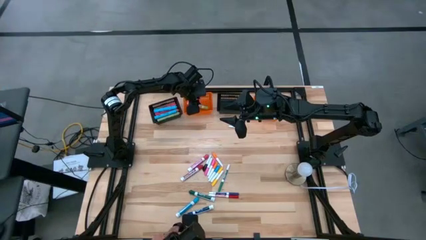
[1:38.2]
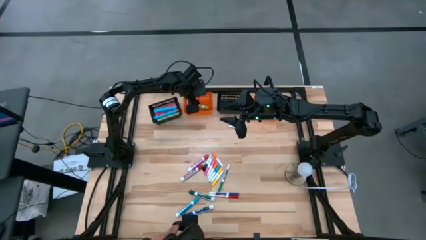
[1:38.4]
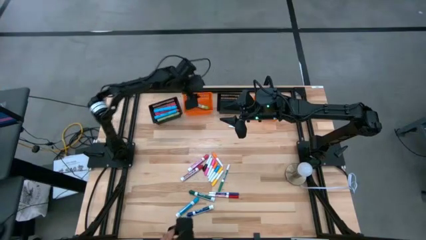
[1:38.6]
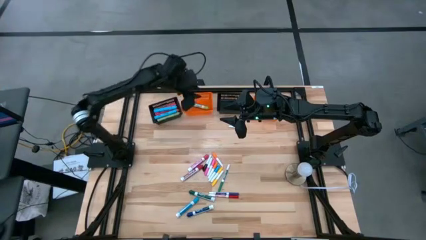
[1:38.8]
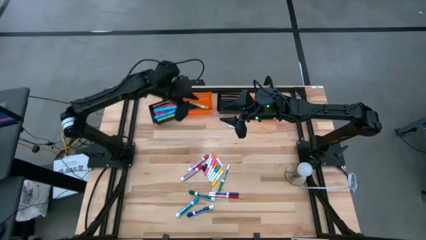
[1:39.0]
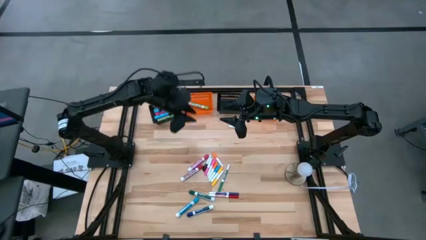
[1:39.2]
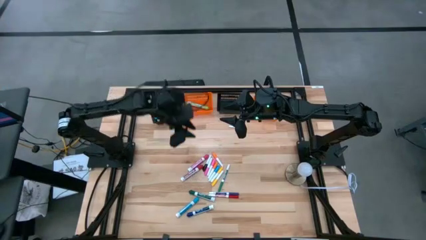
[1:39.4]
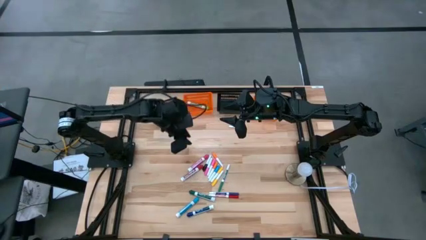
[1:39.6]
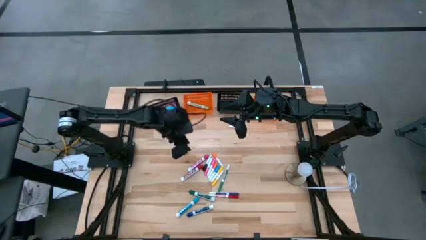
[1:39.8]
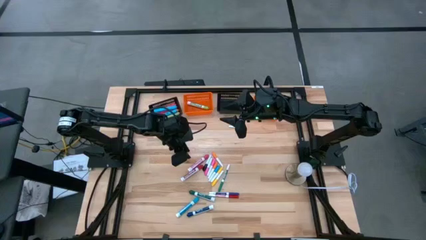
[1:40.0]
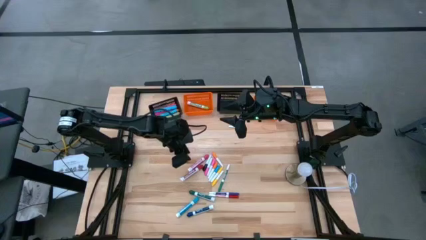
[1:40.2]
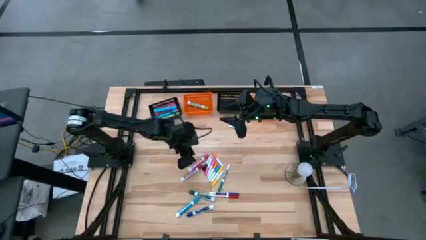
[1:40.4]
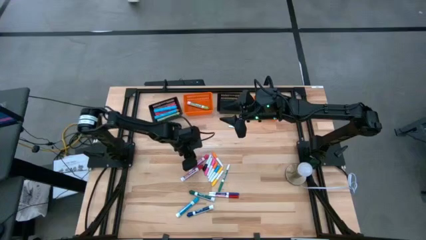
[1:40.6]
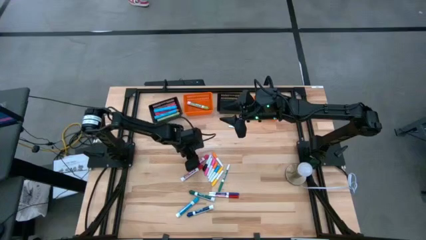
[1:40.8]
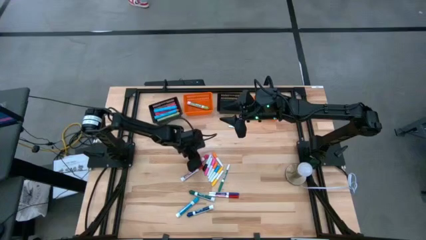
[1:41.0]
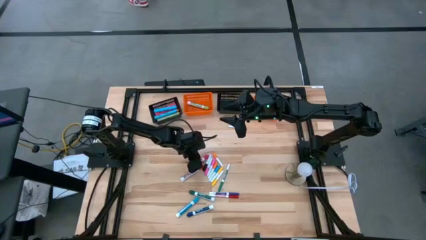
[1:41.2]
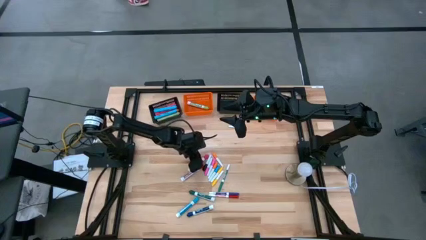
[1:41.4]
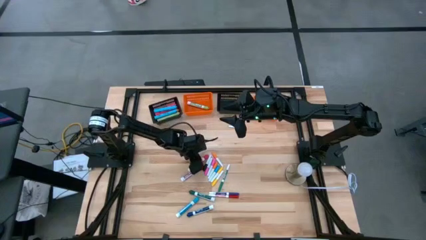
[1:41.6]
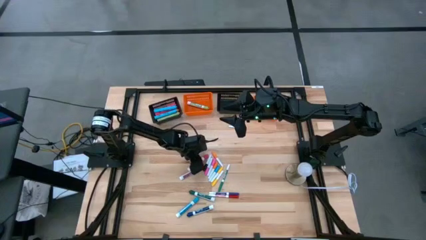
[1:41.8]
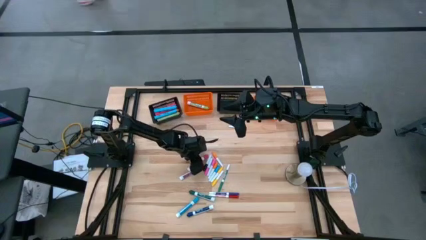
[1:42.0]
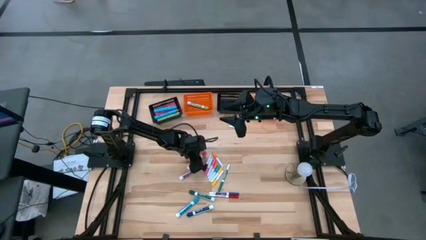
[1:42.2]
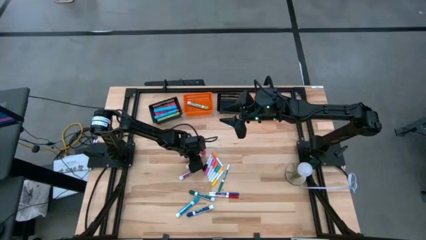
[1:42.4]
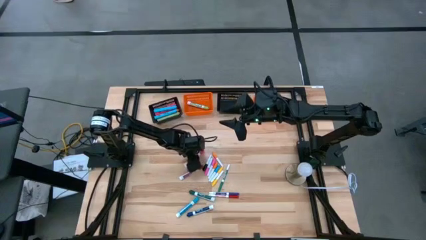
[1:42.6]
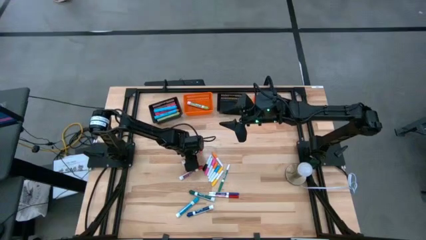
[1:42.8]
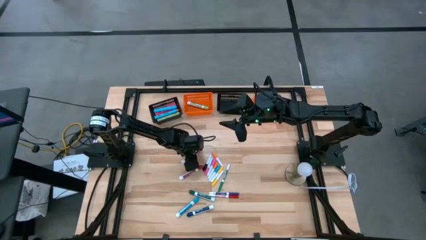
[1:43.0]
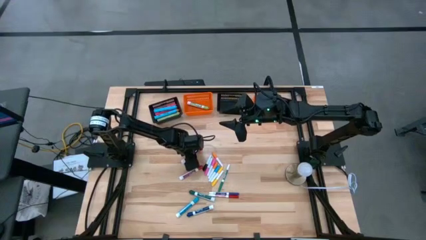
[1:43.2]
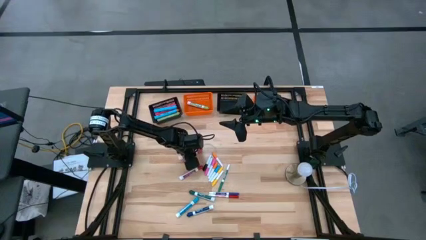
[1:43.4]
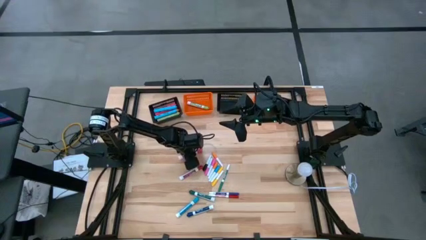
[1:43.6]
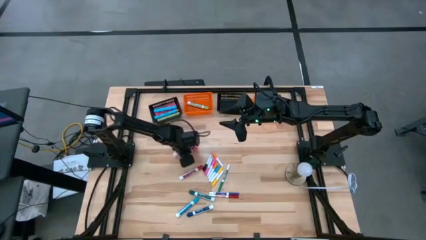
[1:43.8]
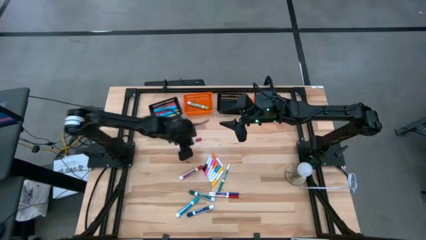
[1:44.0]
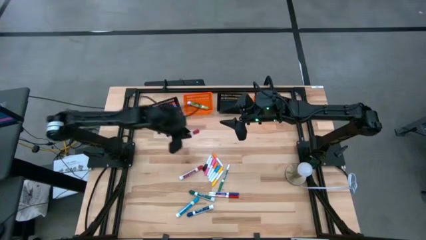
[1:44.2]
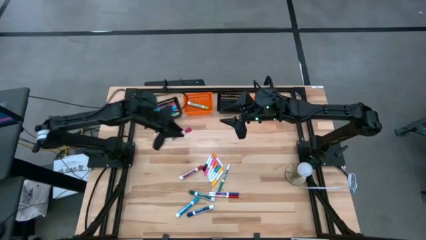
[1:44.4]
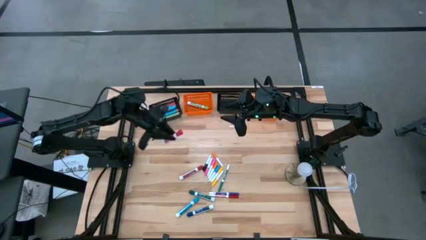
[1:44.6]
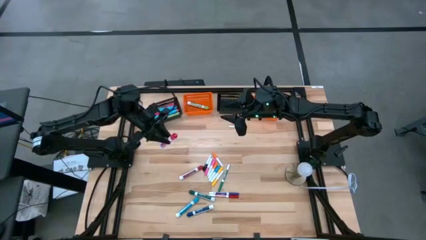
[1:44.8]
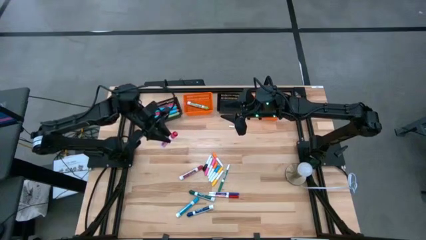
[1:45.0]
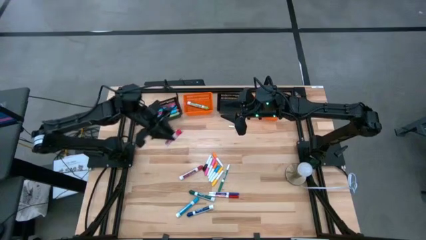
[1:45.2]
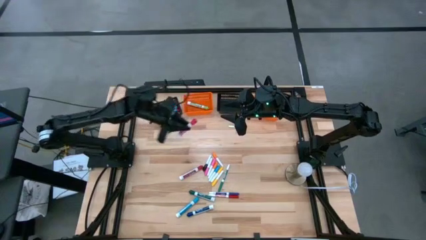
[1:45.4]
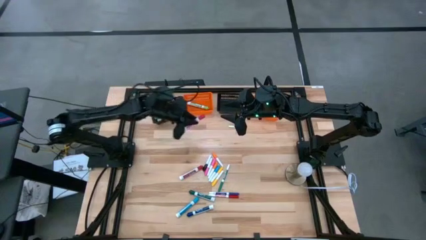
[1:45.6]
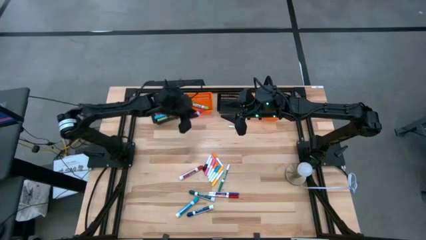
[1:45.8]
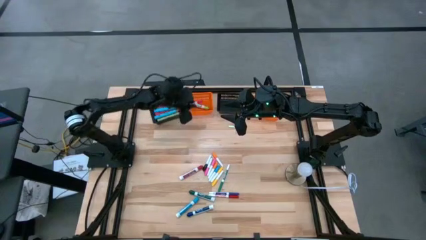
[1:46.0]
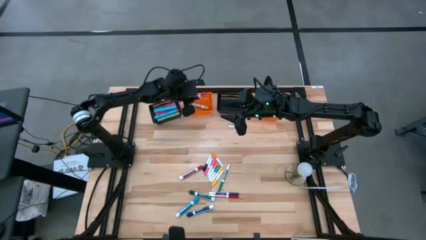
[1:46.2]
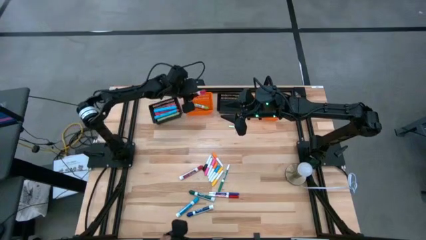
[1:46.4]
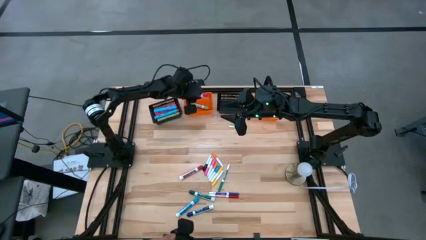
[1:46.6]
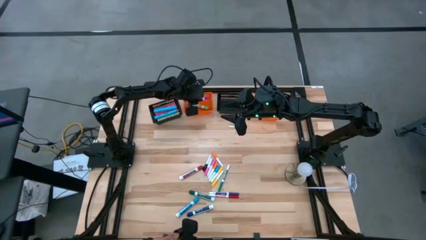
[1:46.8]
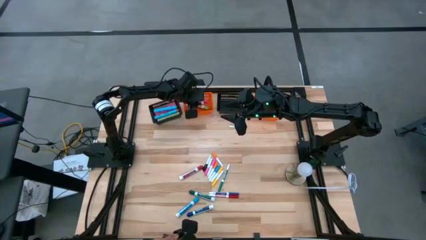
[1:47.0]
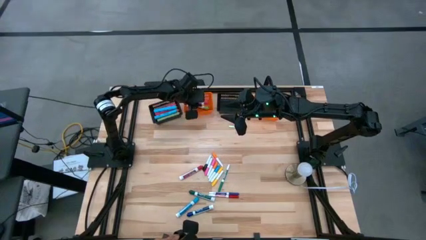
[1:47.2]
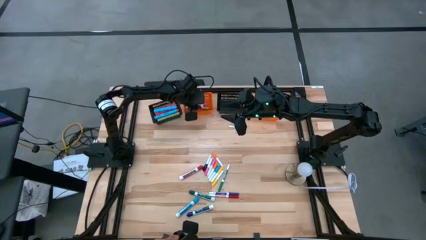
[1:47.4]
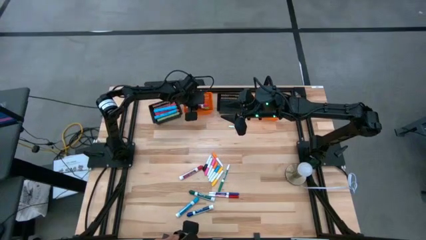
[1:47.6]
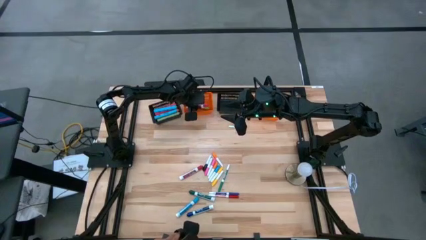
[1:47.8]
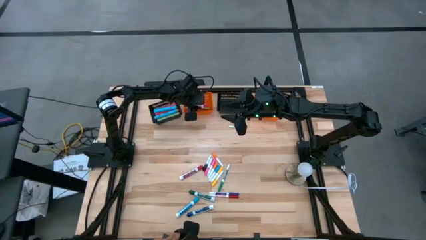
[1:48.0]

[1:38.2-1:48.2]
Task: Pick & Place Markers
Put the top pink marker pen into the left orange bin

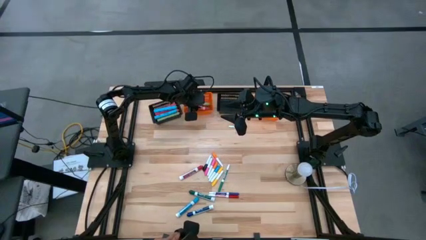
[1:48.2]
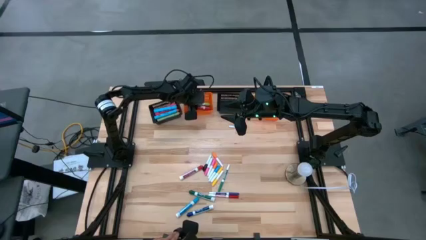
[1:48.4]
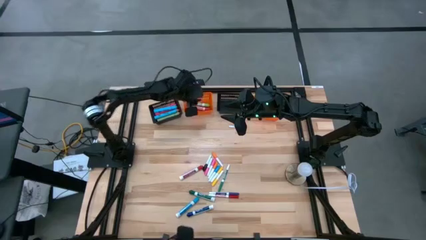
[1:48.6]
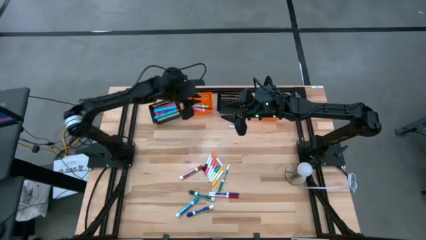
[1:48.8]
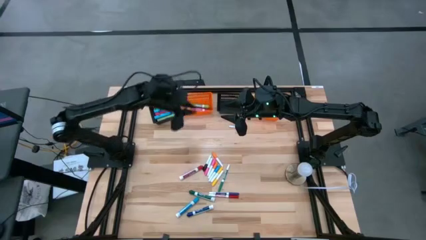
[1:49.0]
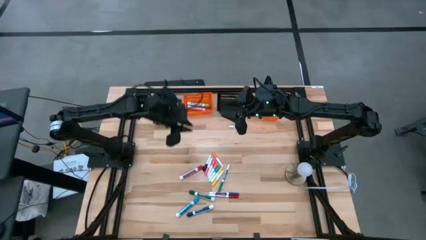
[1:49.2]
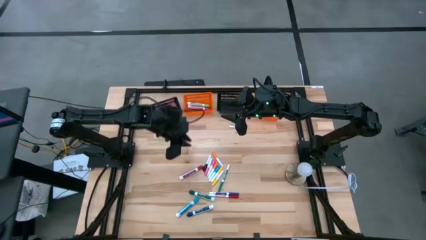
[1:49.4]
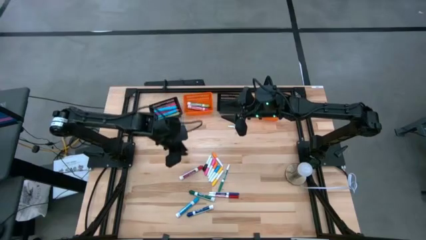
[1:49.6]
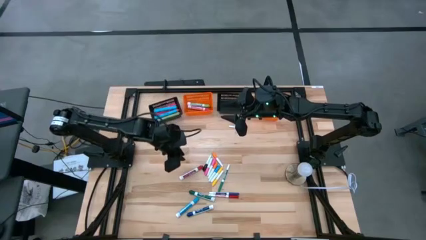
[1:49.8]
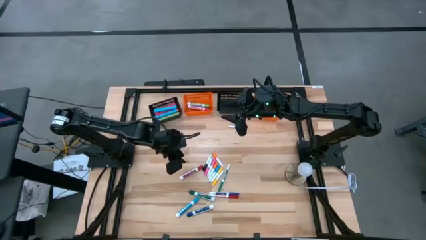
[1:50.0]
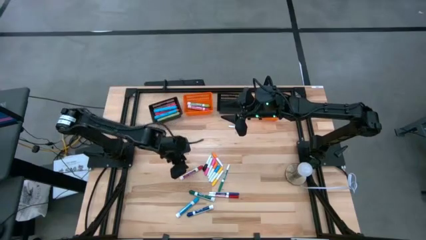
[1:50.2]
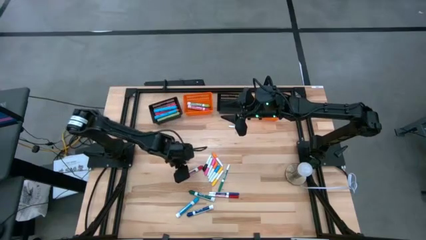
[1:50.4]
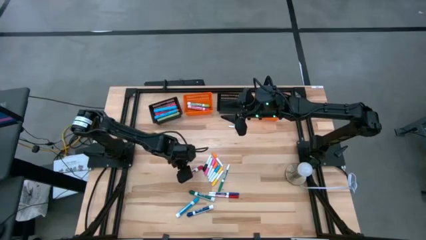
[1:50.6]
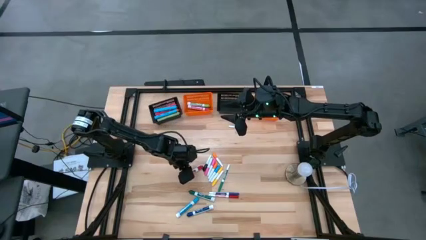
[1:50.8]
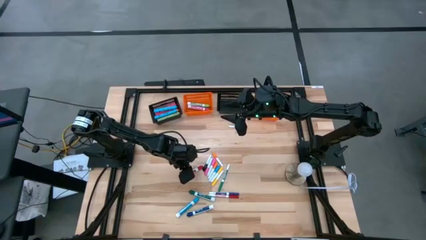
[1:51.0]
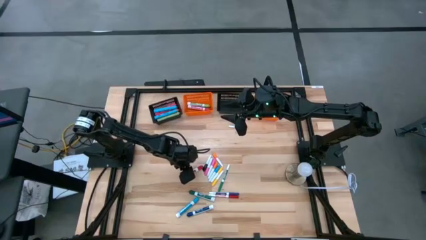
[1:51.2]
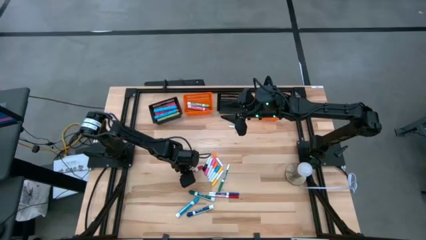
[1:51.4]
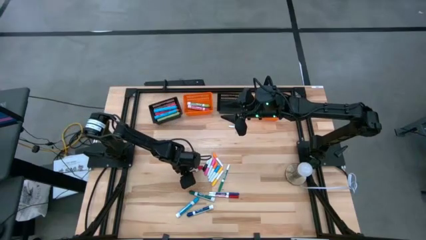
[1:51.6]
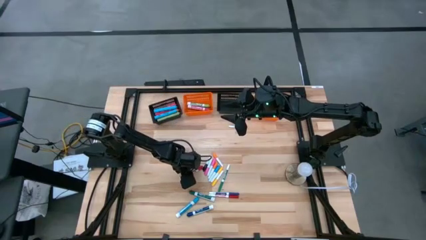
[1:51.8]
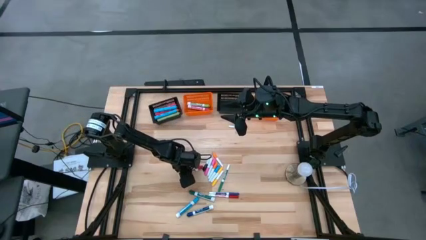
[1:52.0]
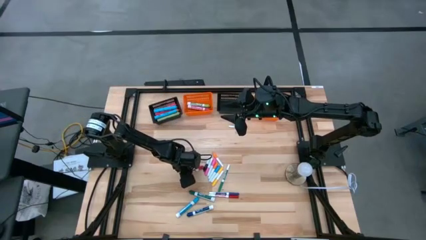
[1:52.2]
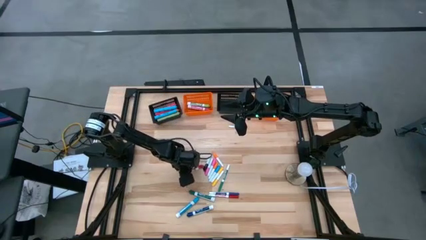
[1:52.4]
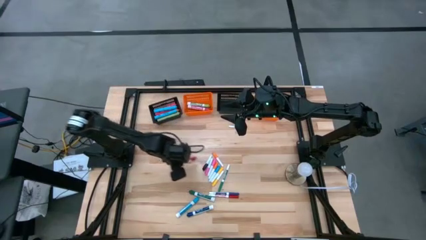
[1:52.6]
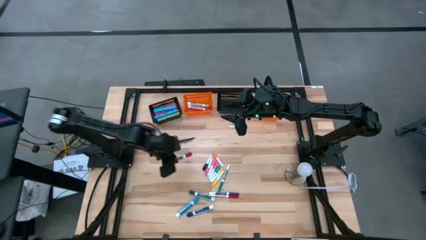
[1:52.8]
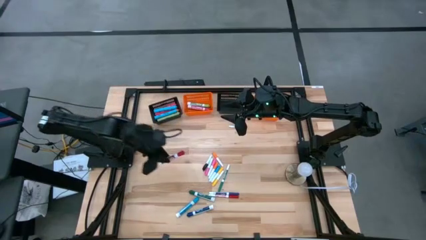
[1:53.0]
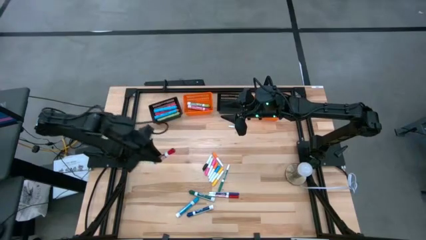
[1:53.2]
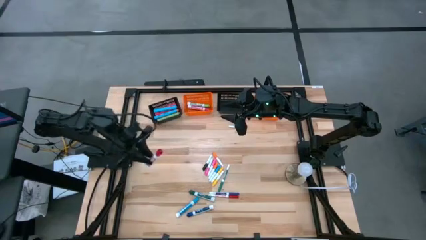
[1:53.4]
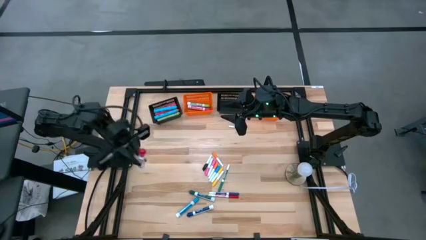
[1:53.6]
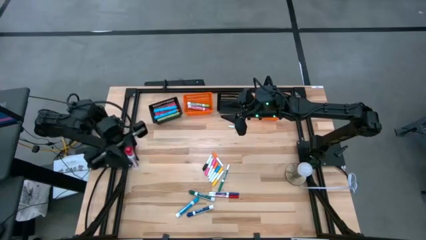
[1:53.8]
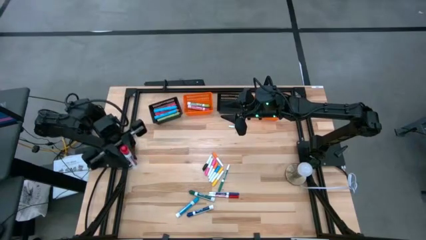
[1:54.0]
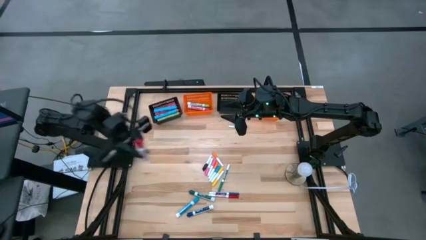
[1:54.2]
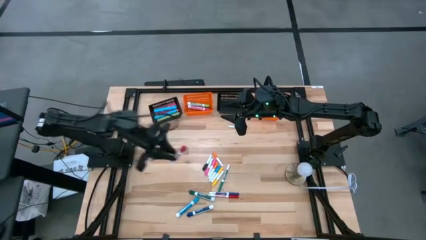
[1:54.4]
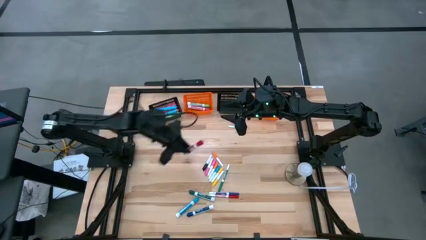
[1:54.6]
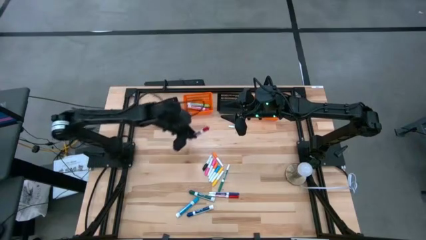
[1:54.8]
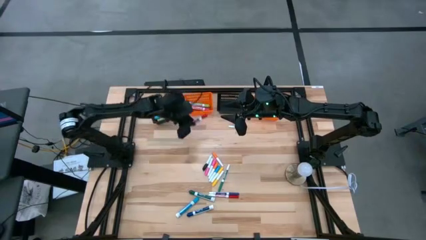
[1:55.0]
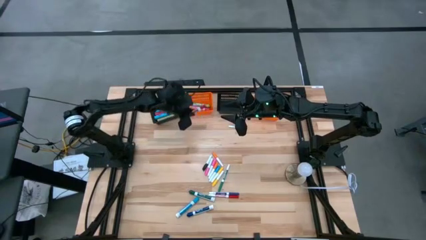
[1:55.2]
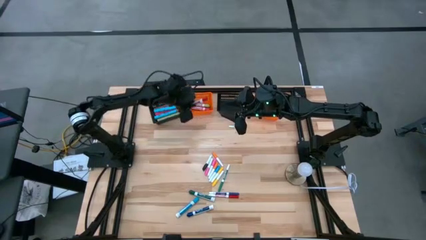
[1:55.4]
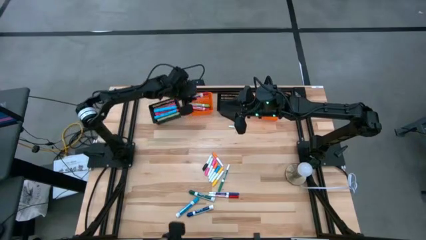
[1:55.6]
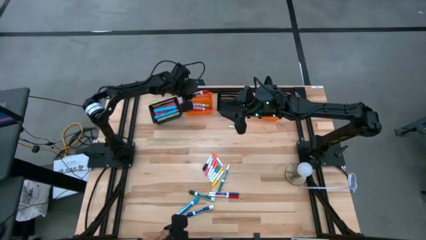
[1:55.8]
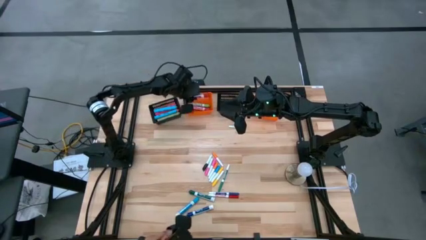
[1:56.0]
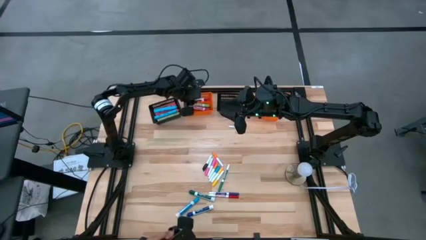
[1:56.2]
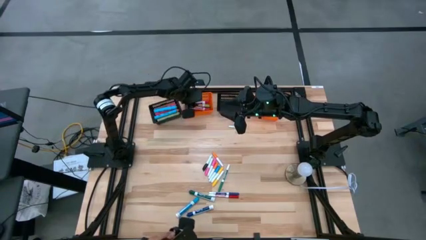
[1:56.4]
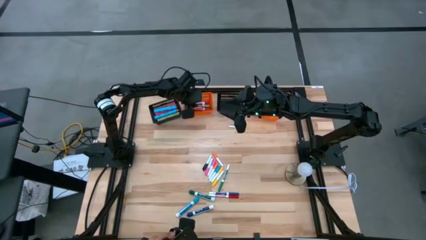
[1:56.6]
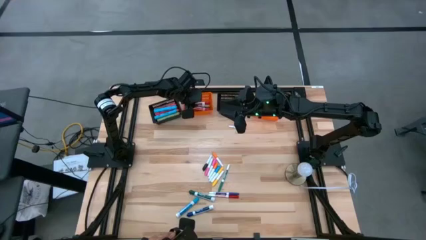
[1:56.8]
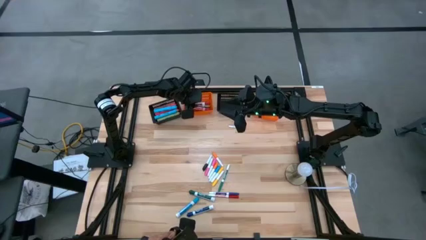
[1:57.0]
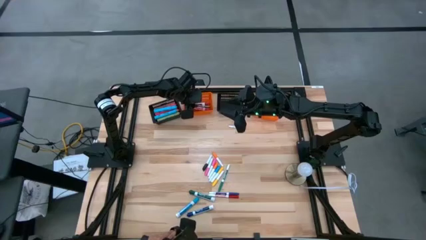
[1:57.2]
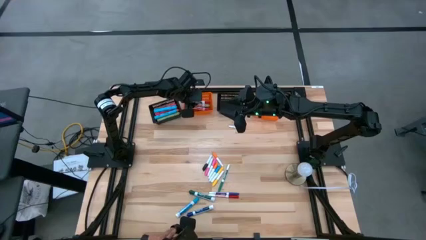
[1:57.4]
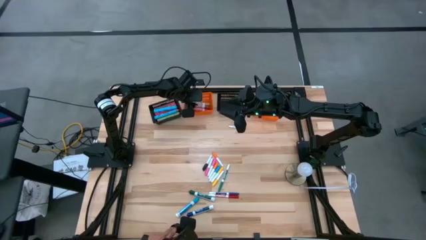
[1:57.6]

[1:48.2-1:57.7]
Put the pink marker pen into the left orange bin
